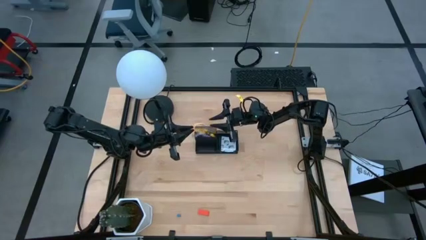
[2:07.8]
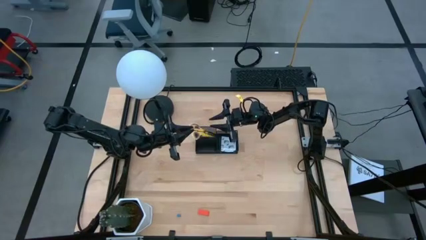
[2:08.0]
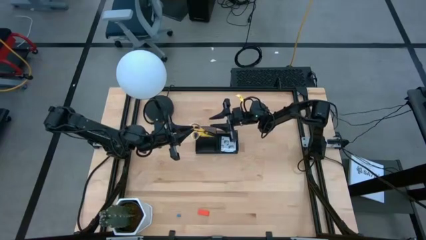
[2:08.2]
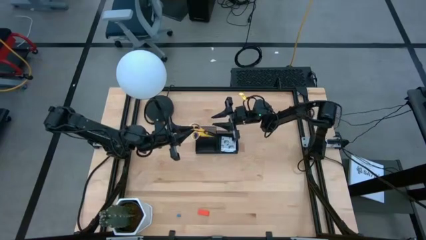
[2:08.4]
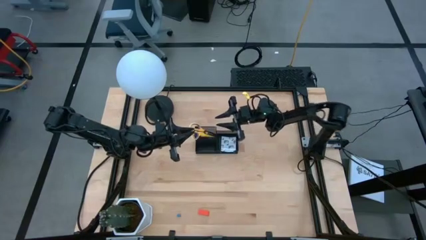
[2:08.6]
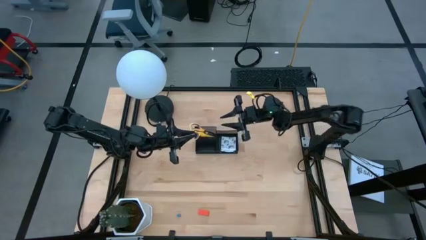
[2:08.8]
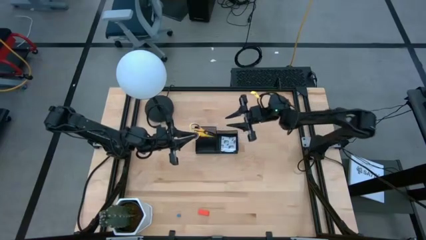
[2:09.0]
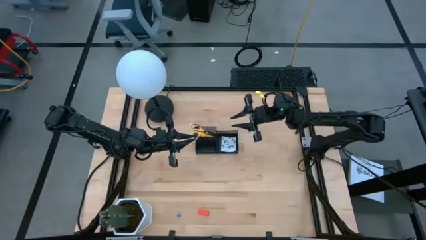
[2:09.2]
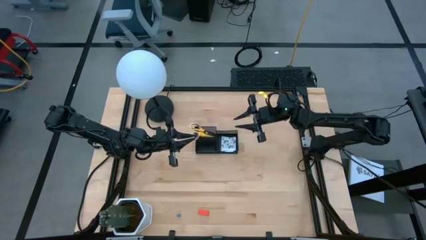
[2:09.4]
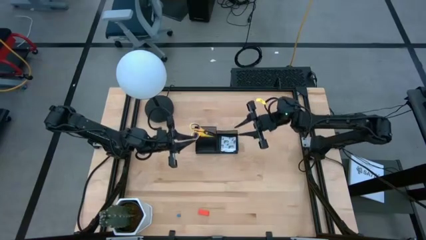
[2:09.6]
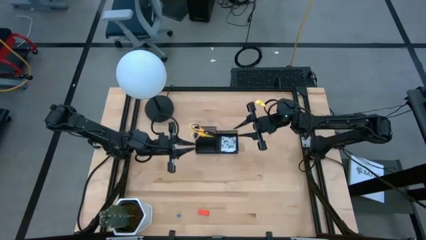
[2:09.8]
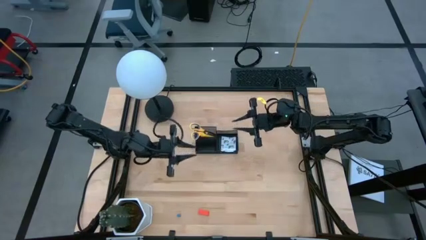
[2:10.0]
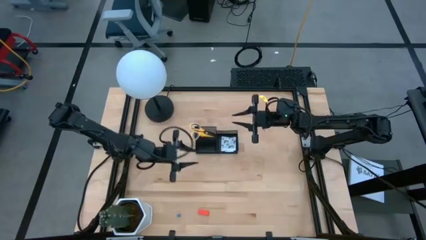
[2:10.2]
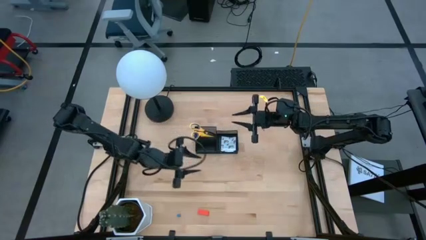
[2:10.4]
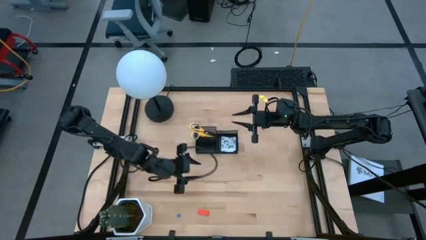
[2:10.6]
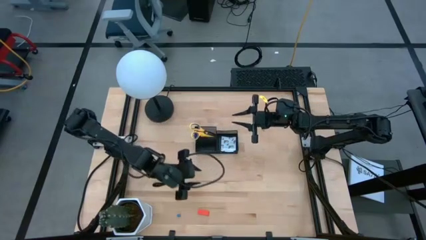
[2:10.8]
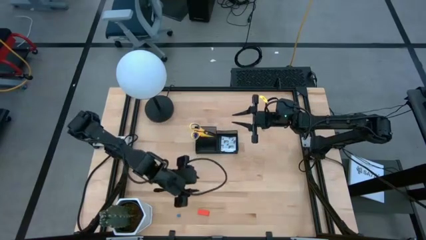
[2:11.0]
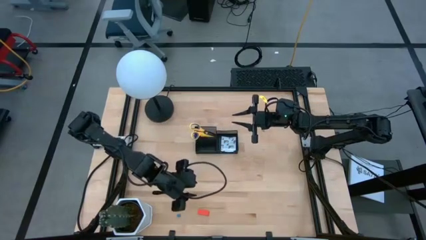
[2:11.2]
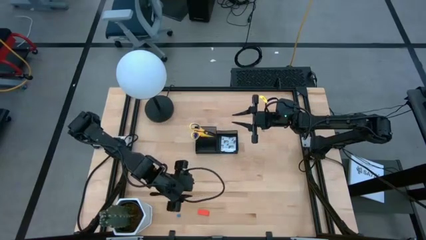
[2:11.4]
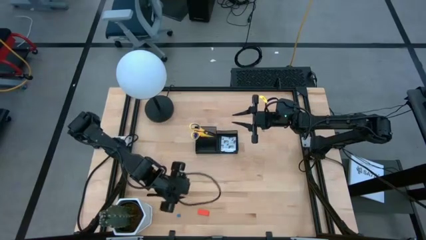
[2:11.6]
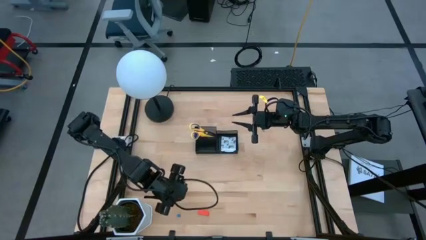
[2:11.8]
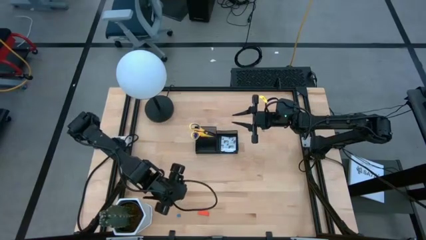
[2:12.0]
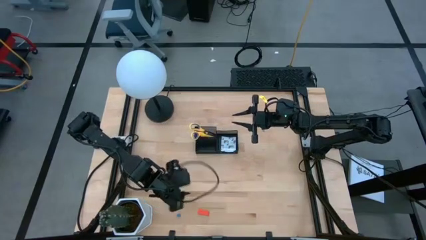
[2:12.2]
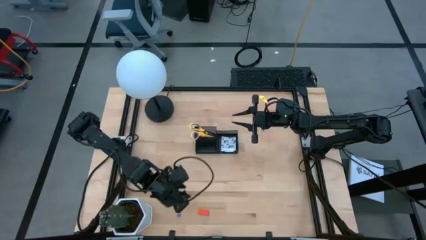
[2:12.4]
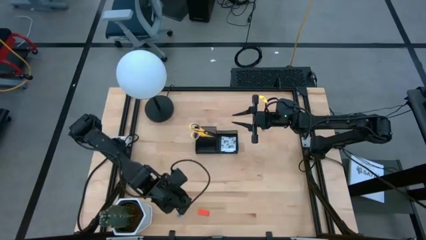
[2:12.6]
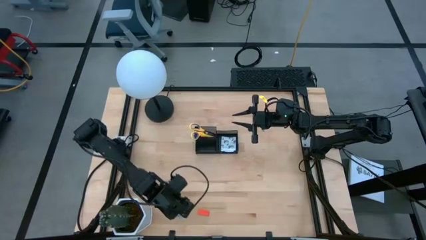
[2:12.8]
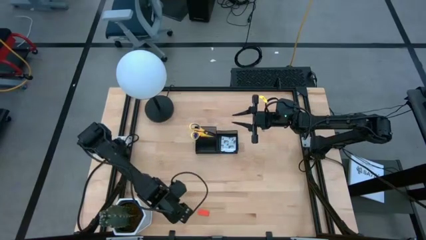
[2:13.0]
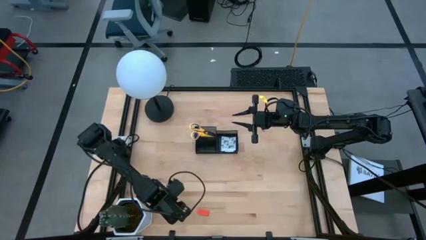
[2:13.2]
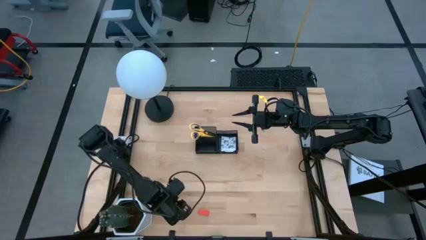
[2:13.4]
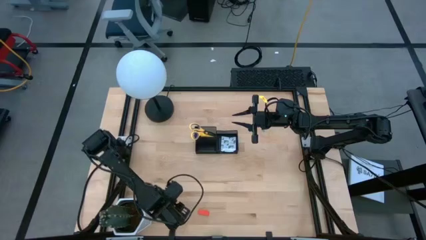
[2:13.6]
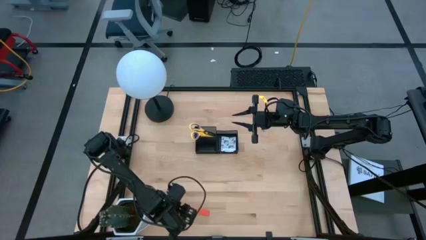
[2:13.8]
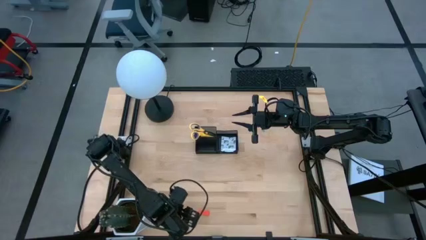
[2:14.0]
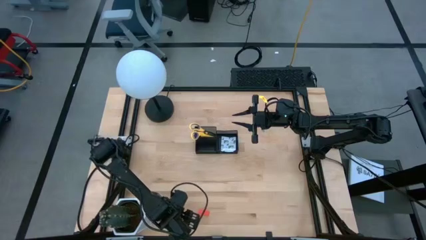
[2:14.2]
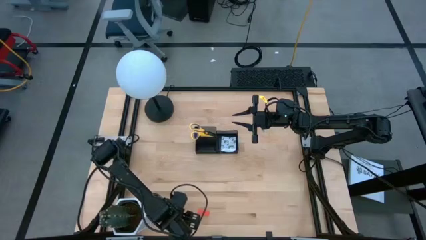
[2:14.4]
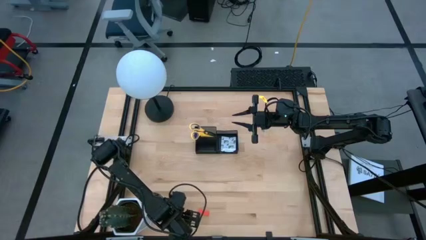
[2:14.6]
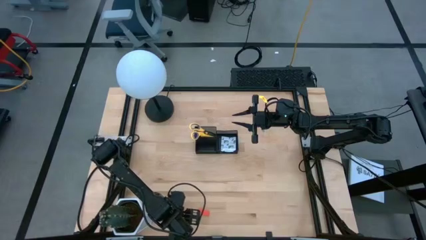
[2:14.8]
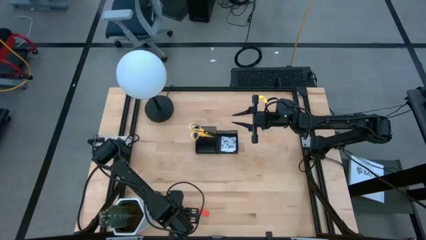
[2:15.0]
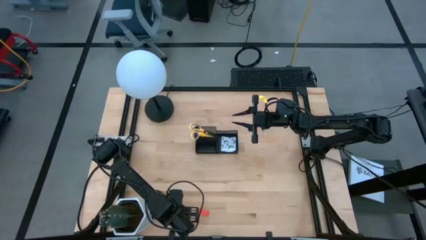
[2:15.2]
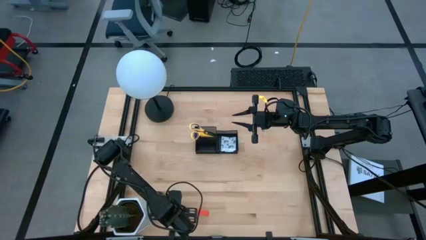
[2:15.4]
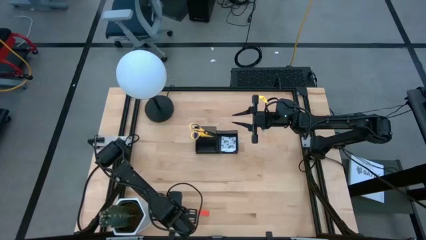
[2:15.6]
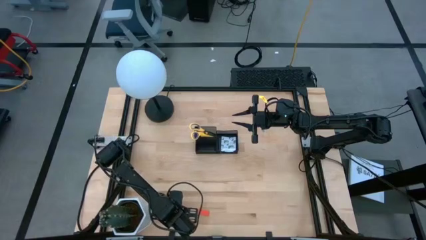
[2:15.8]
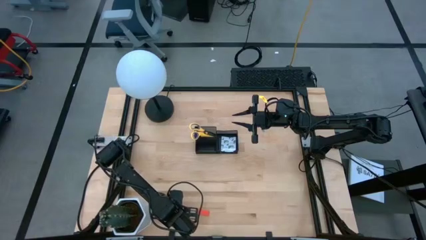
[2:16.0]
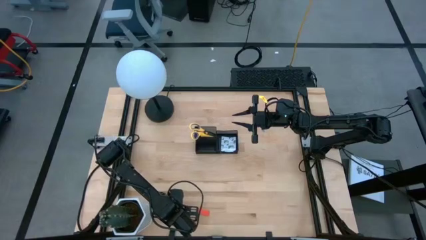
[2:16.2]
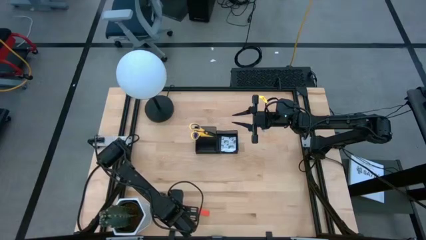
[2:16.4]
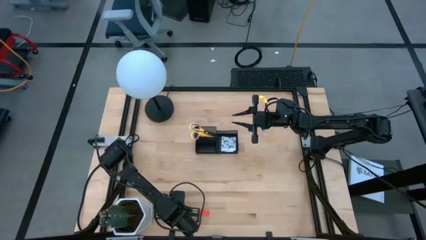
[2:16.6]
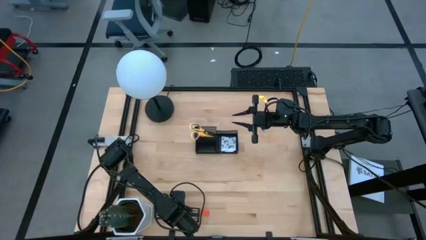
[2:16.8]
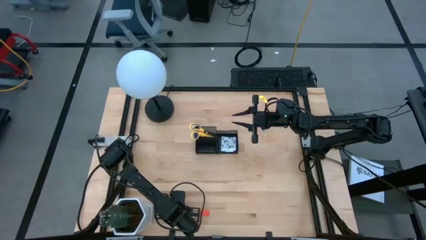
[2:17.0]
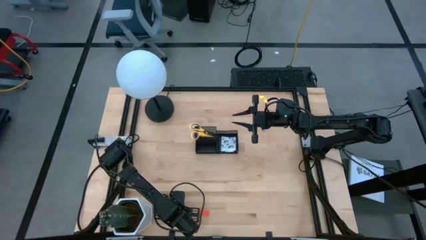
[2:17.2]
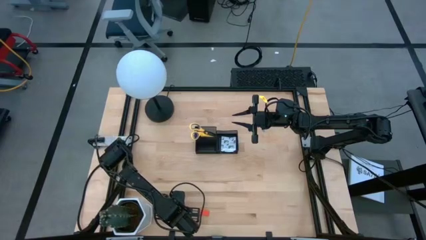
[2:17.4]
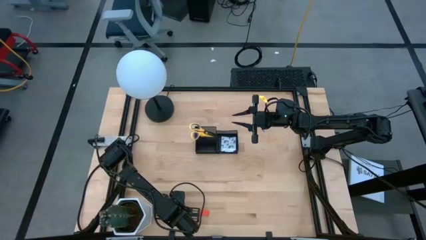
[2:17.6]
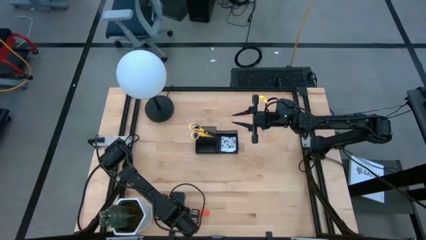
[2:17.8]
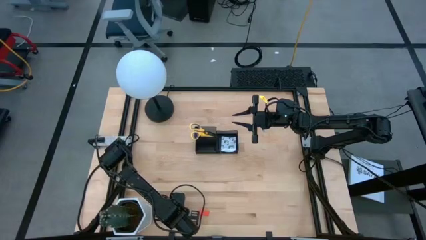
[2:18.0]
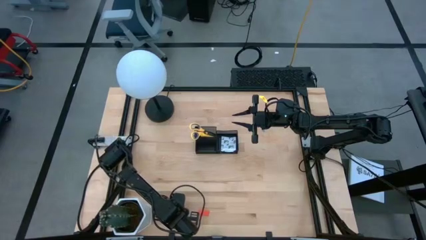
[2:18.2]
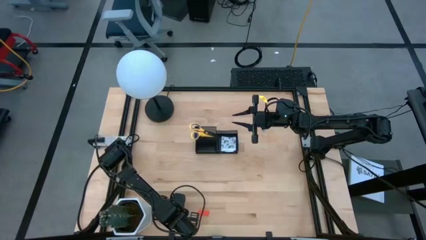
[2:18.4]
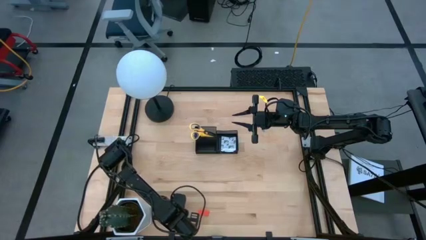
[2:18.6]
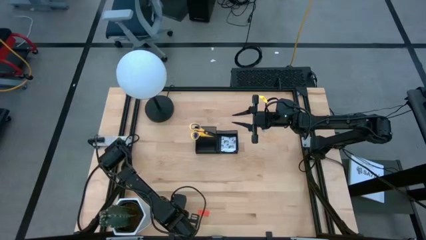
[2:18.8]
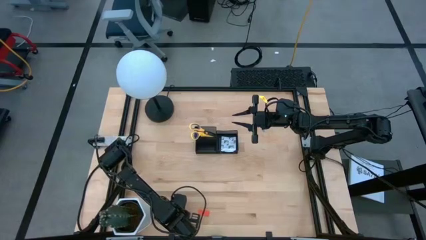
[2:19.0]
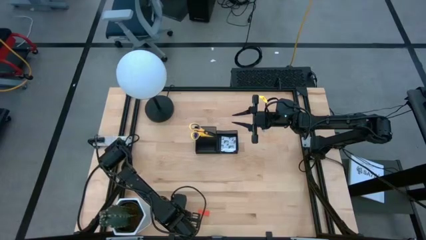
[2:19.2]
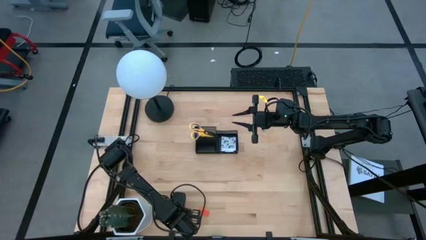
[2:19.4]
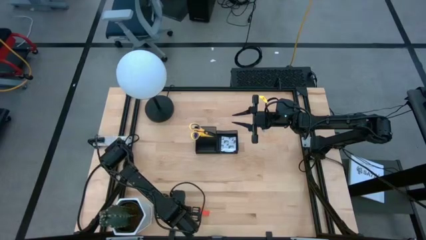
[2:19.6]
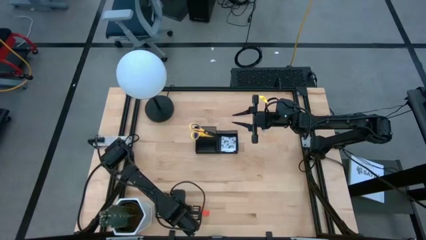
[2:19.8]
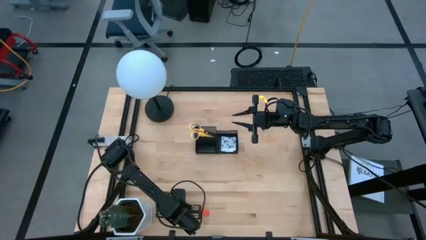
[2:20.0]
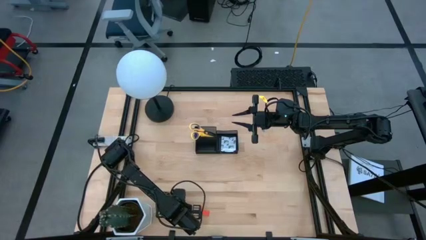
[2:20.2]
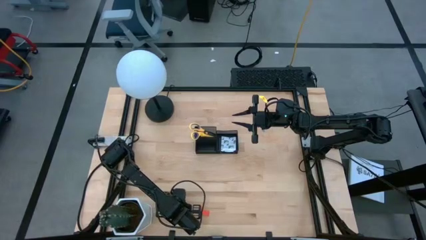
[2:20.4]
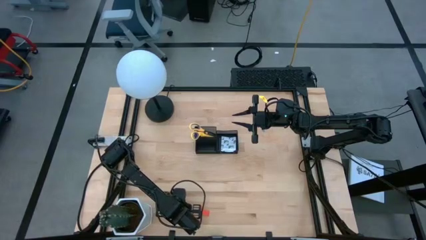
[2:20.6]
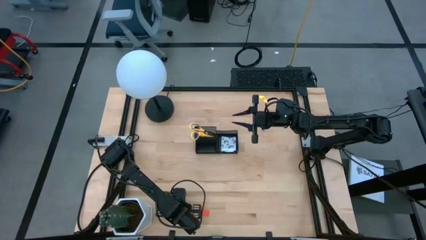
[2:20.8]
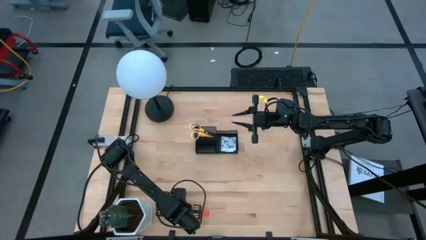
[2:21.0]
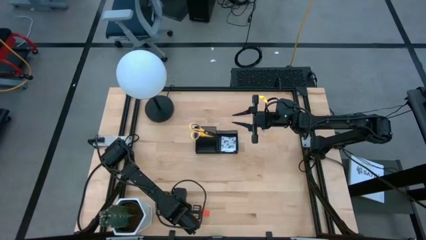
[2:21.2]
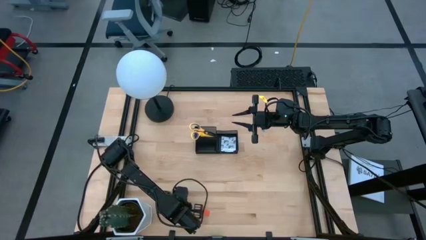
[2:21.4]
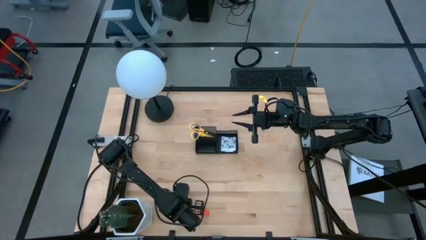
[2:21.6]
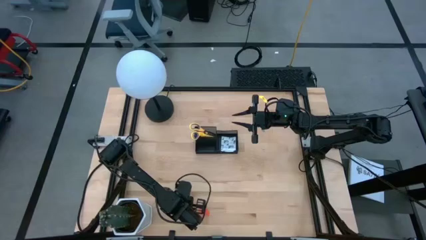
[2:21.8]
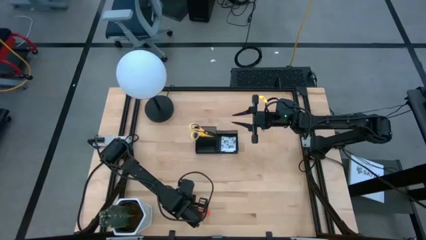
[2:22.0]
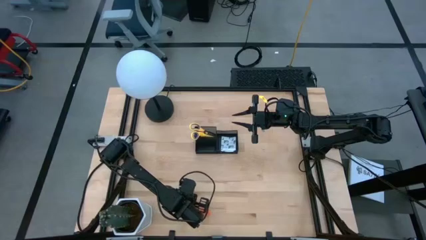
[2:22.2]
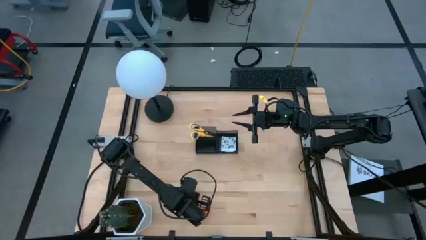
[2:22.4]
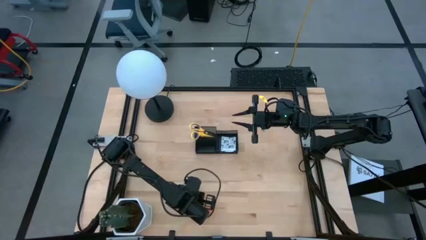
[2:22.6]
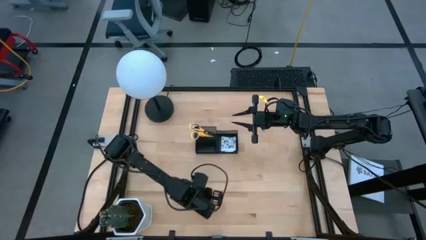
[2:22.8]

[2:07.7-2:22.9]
Task: Pick and place office supplies into organizer
Put the blue binder clip into the desk organizer

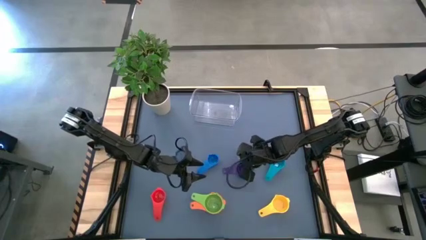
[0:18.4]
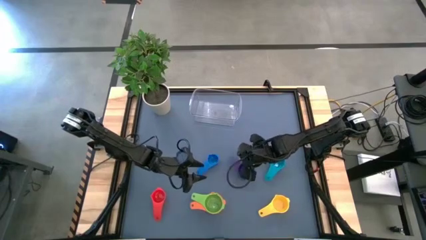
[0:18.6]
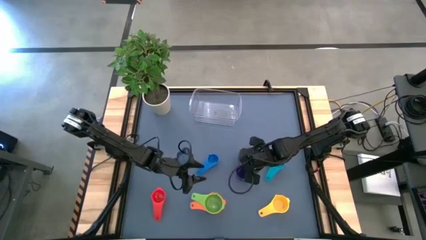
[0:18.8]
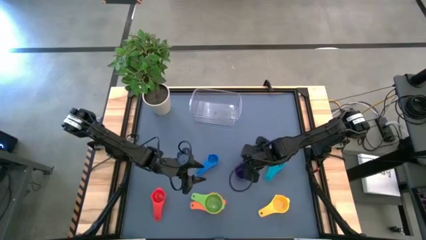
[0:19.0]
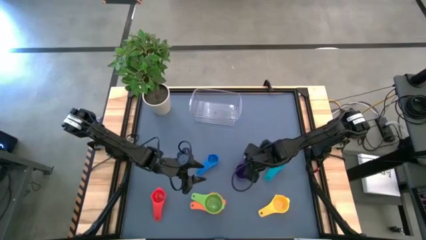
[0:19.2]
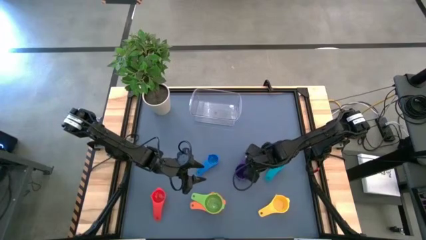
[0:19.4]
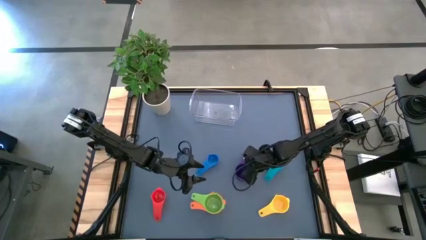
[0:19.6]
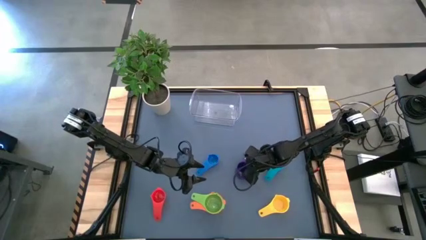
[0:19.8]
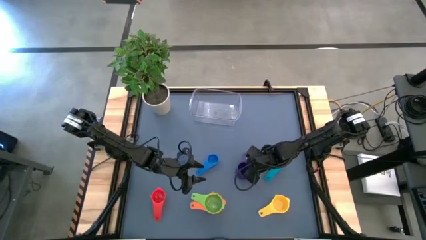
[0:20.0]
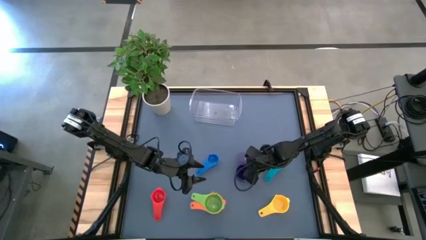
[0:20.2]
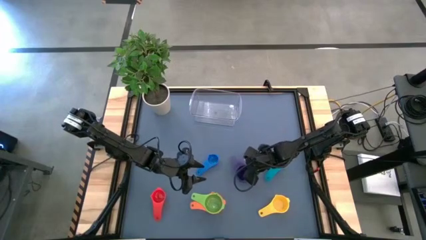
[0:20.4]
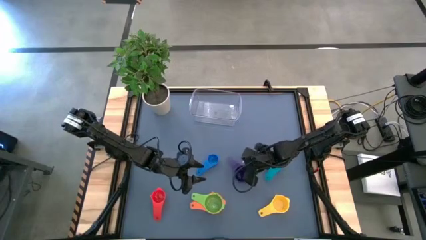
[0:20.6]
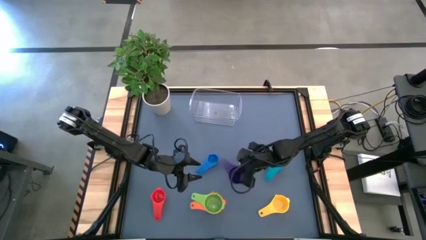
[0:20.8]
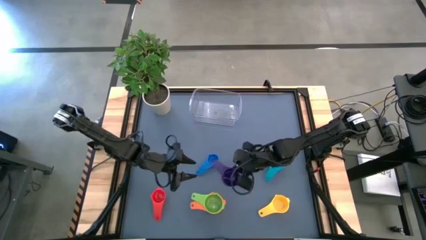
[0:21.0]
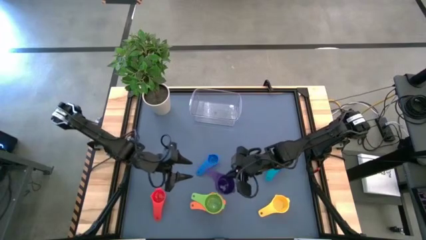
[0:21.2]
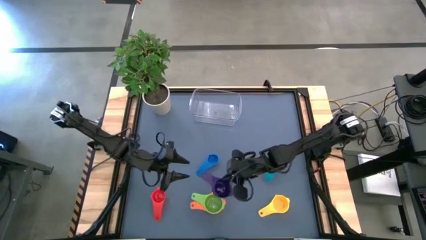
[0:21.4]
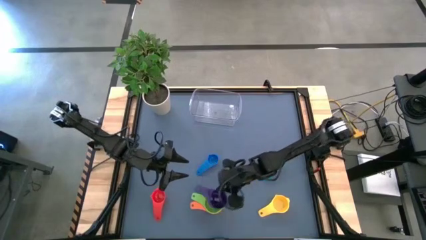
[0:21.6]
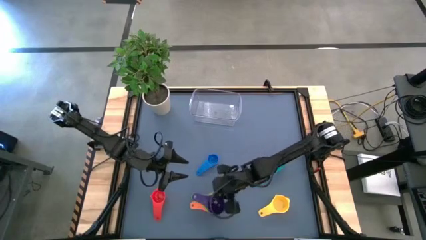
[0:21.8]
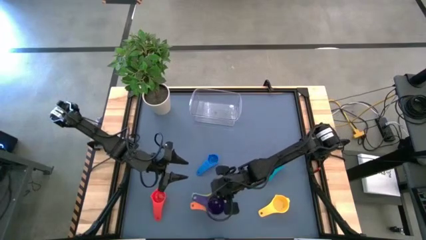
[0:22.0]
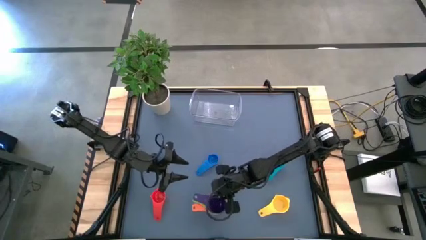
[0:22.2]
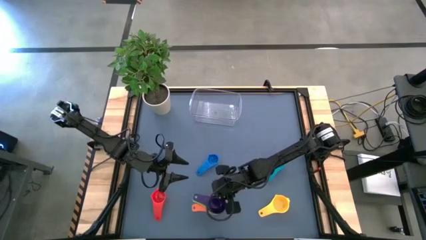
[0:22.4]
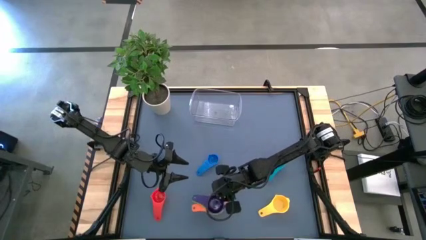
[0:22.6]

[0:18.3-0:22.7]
Task: Nest measuring cups in basket
Stack the purple measuring cup on top of the green measuring cup
